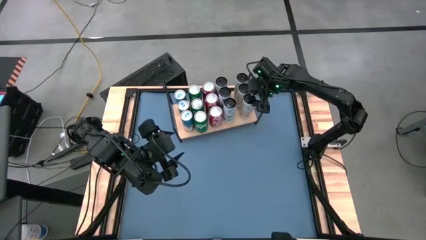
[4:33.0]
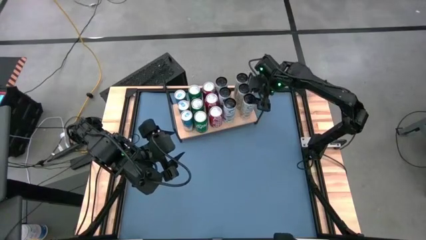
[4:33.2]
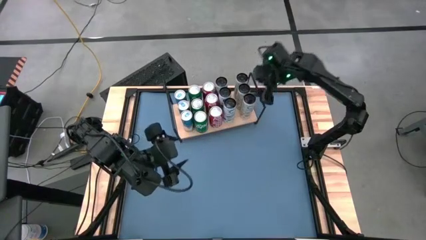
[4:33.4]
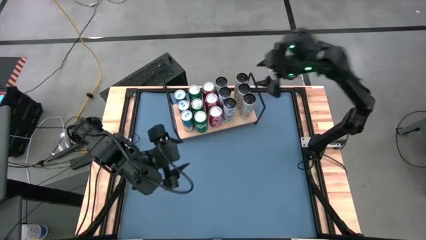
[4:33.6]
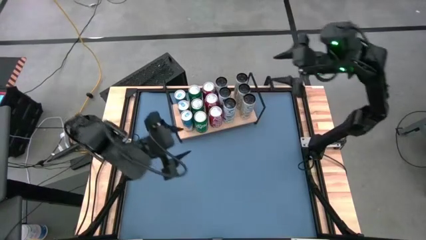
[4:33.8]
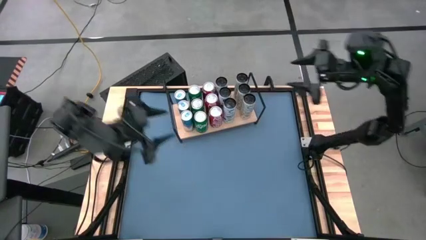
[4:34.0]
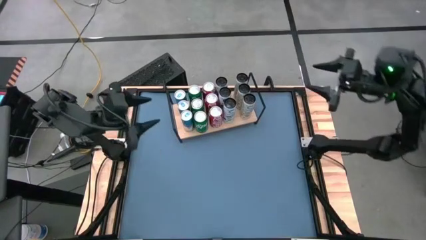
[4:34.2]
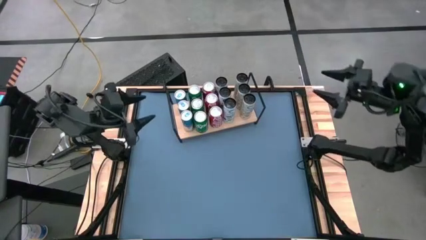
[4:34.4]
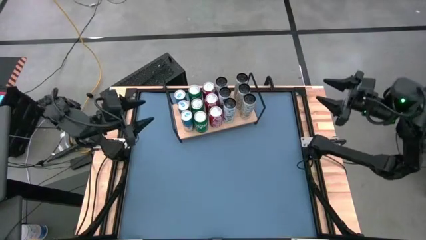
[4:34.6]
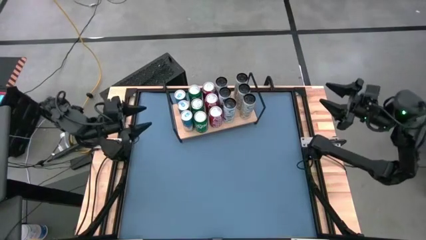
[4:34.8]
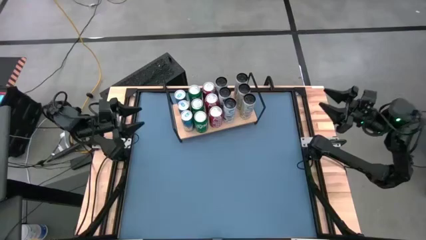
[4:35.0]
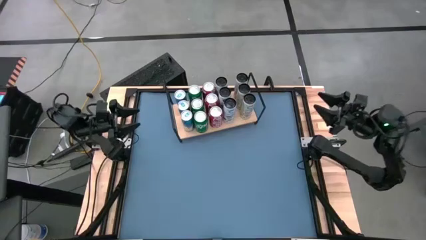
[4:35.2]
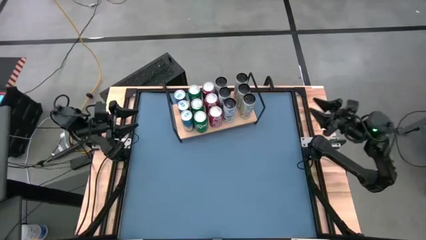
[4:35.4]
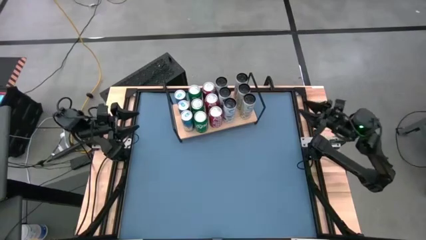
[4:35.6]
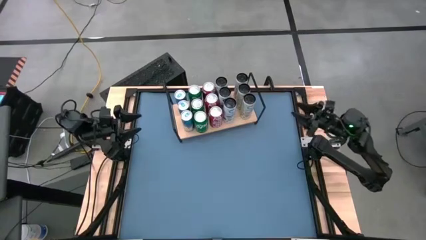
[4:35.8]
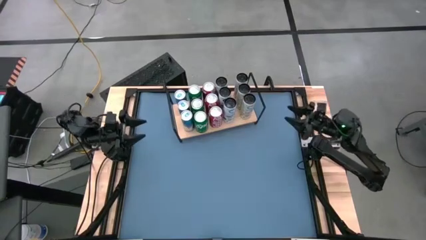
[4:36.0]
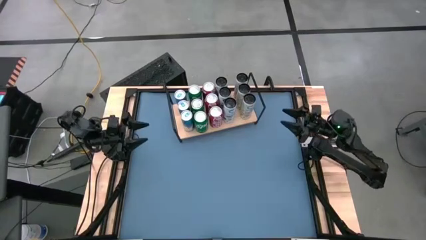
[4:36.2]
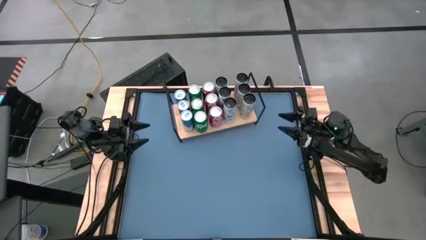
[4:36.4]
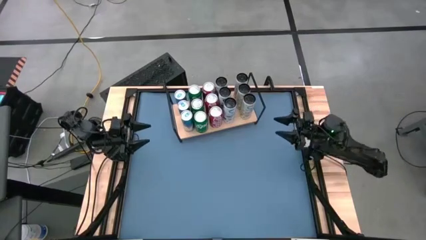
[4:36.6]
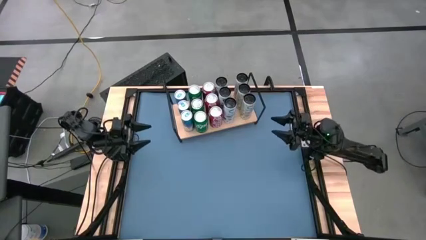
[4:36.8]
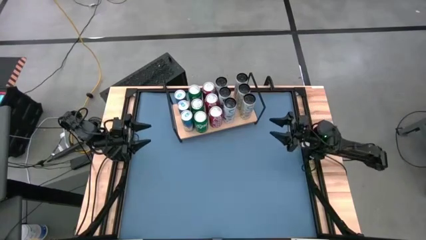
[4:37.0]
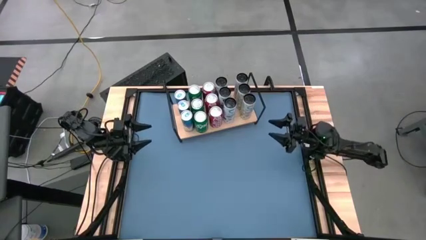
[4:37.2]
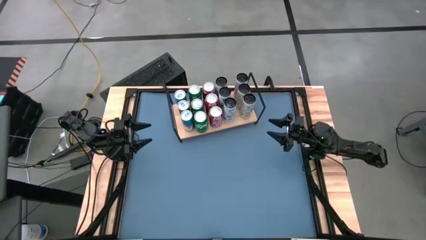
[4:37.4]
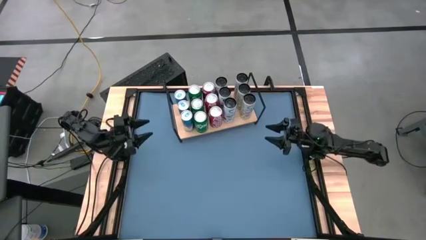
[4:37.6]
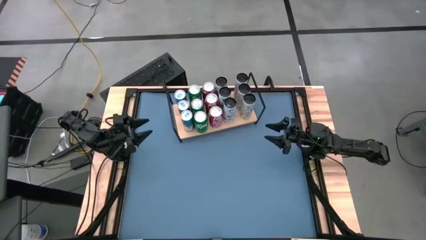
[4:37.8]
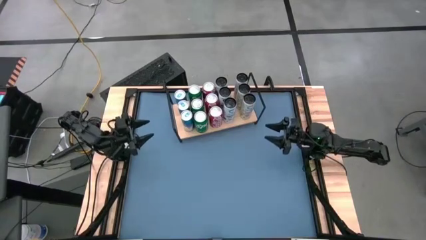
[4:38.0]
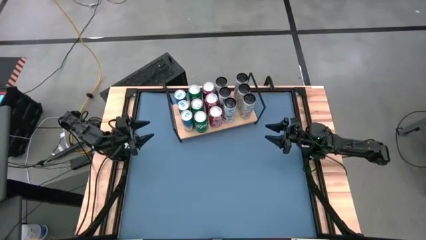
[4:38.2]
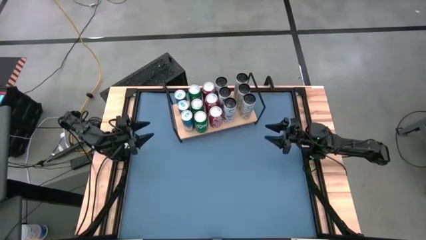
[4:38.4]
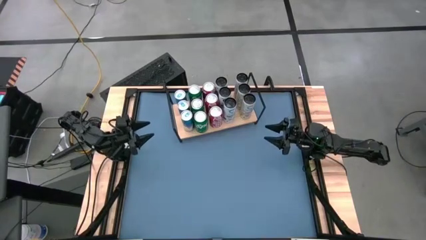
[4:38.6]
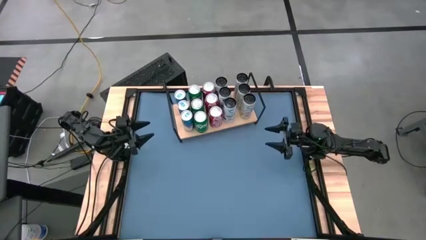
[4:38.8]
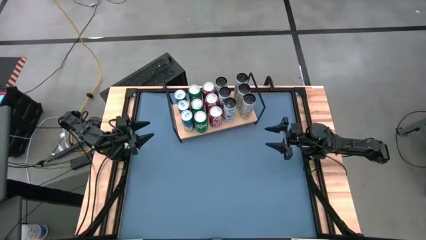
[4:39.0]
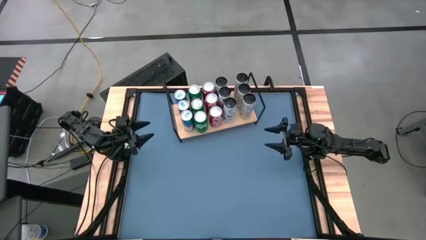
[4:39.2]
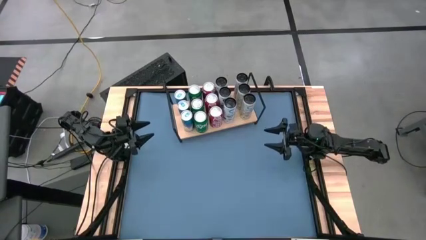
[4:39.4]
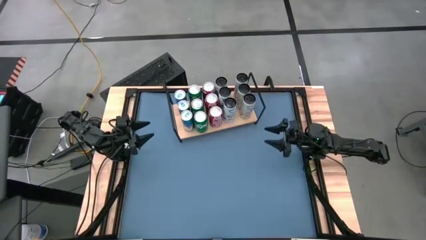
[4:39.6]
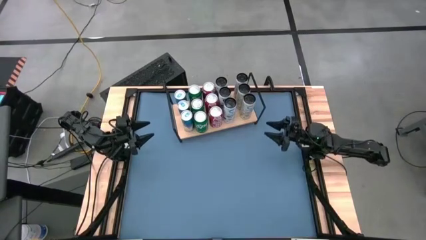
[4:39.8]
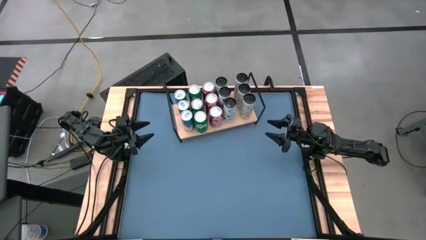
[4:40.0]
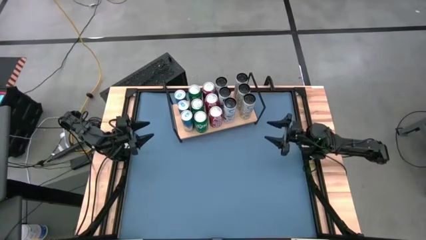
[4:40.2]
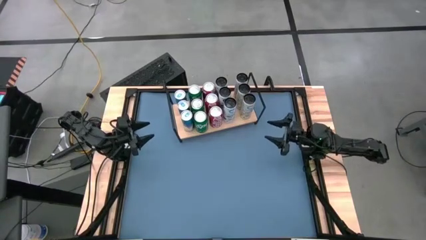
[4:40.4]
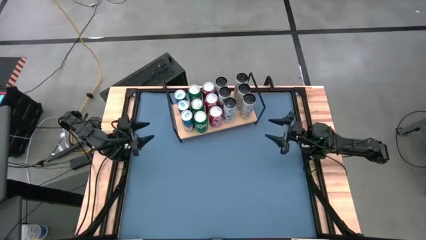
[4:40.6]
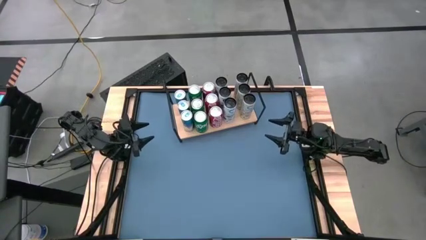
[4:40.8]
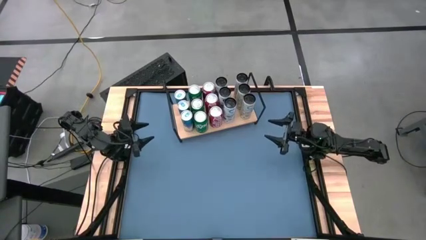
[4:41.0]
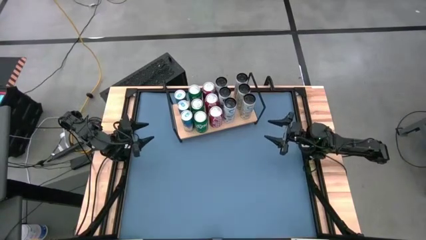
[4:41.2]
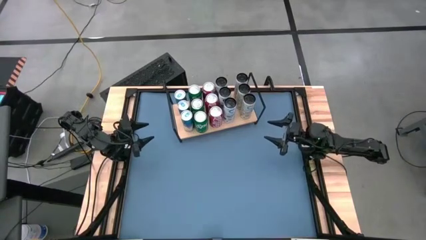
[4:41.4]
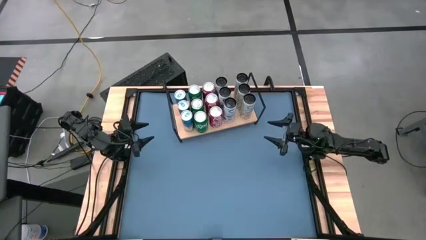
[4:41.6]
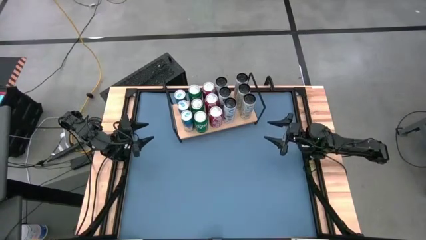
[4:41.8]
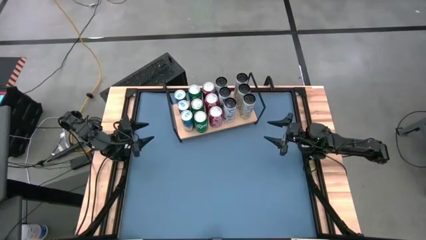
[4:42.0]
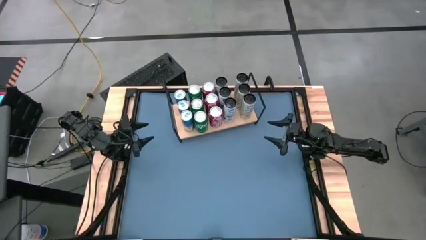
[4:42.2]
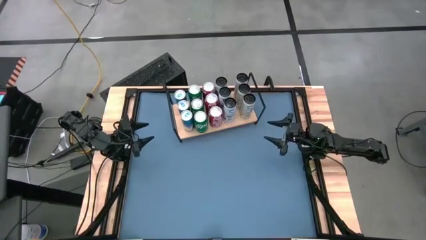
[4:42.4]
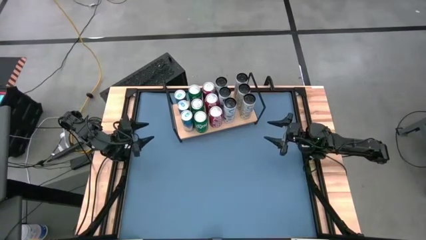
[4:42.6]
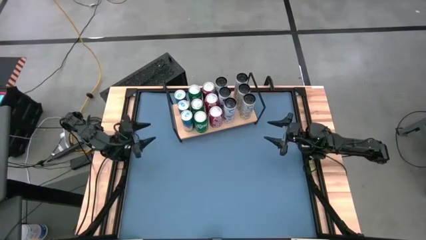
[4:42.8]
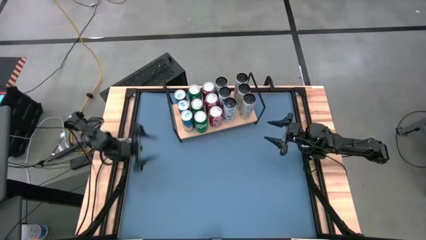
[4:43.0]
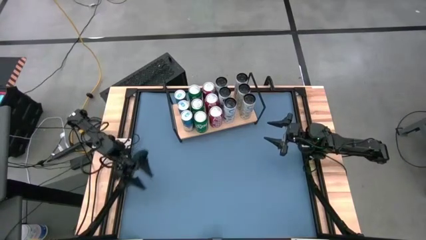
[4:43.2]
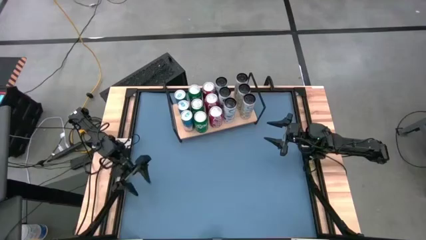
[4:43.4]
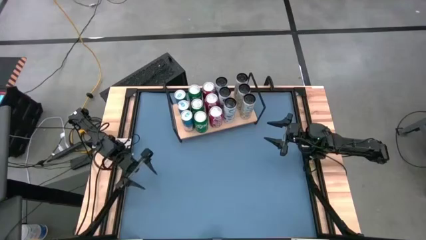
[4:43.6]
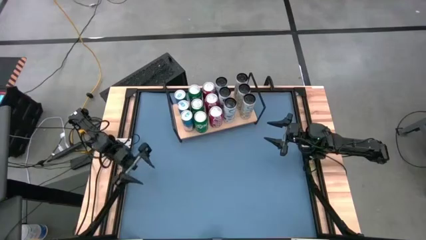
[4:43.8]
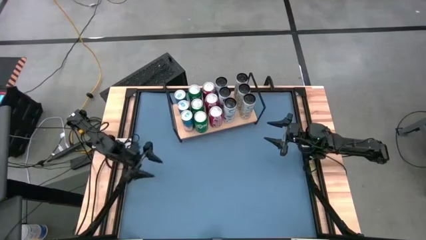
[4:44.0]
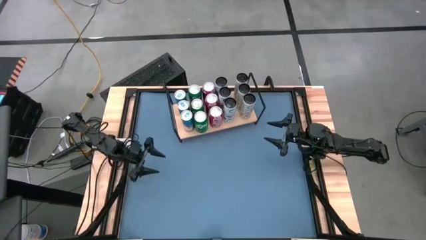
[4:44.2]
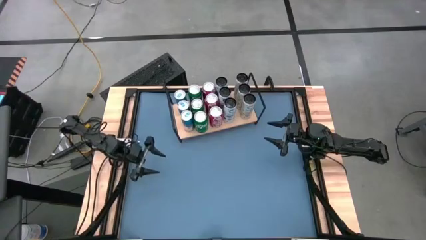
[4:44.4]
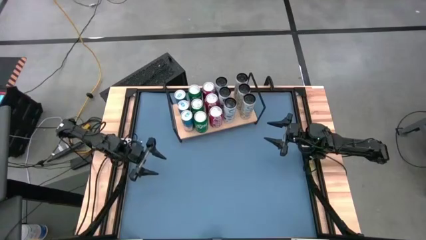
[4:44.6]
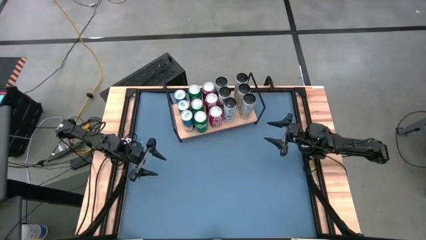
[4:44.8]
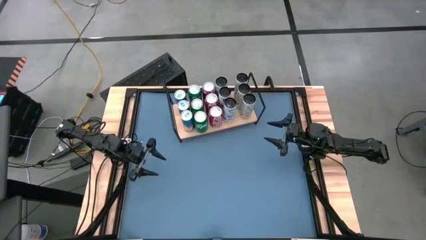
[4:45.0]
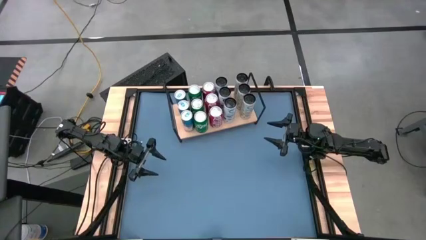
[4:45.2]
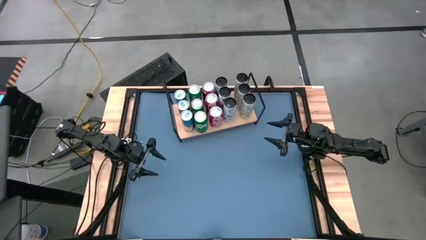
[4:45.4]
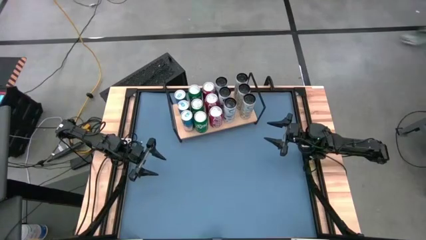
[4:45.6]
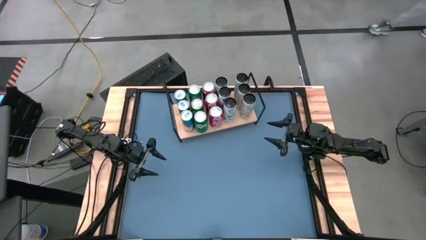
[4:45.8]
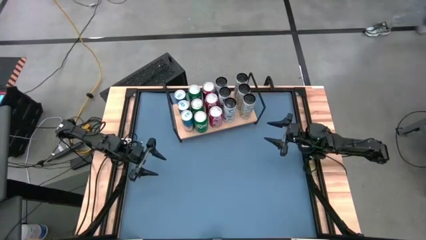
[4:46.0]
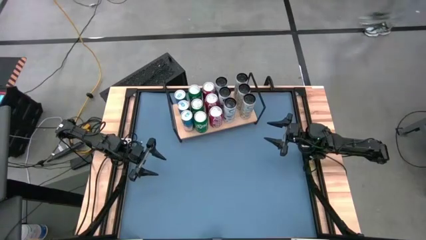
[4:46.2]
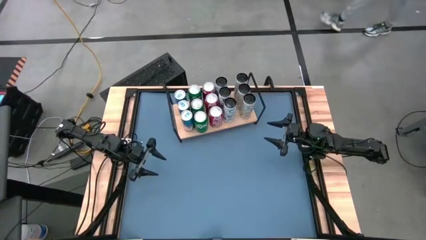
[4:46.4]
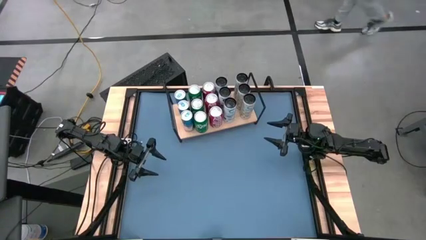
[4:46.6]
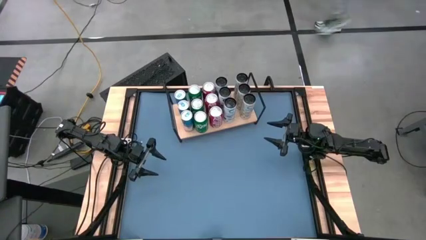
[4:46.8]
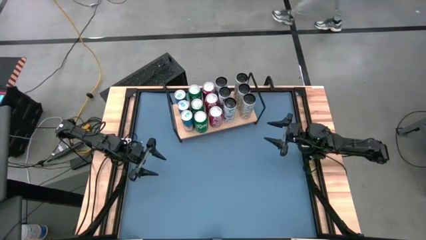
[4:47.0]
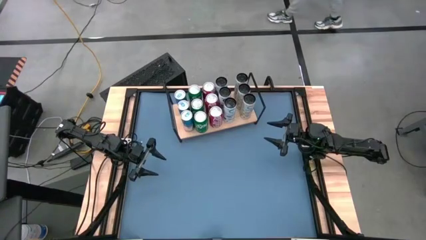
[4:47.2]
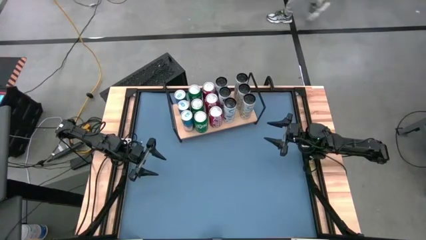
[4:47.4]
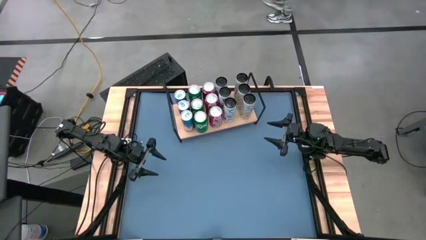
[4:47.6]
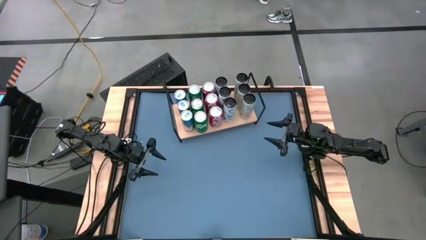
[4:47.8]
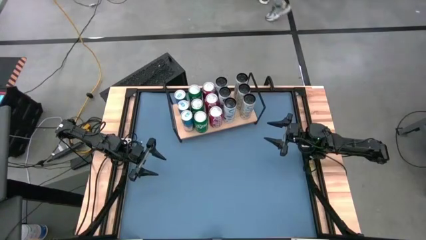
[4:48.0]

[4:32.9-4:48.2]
Task: Place canned beverage on shelf
Return to Home Position
